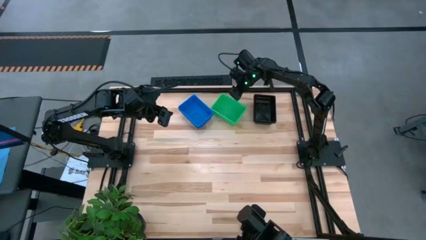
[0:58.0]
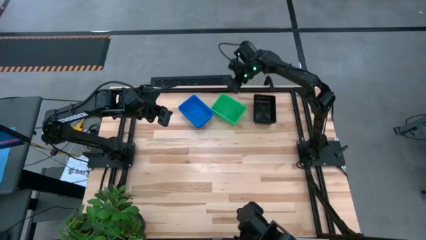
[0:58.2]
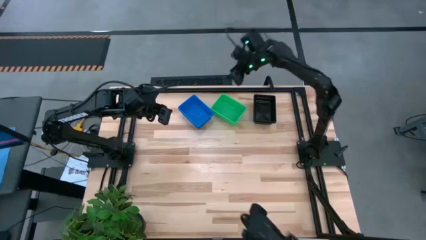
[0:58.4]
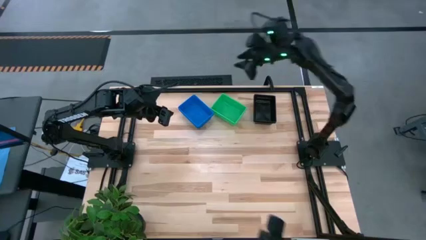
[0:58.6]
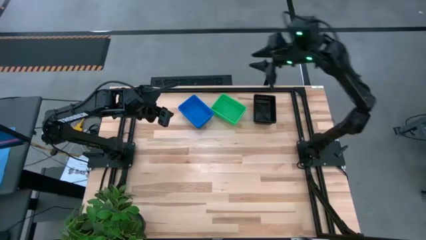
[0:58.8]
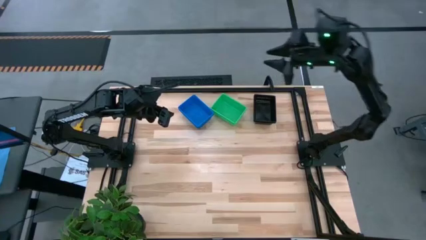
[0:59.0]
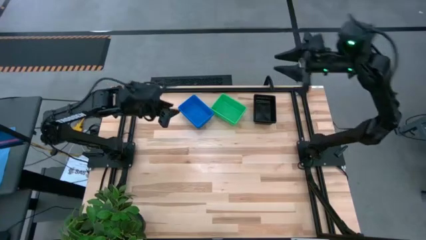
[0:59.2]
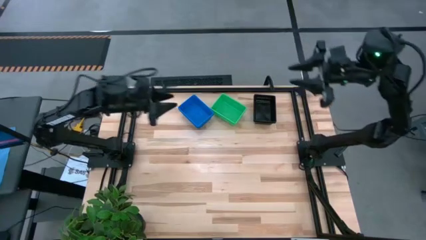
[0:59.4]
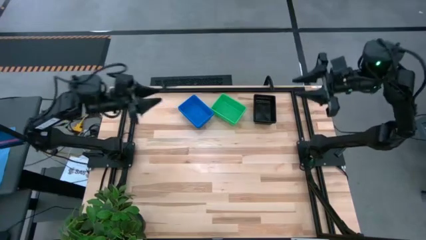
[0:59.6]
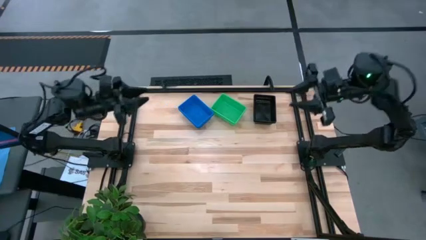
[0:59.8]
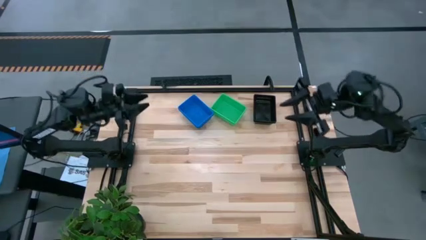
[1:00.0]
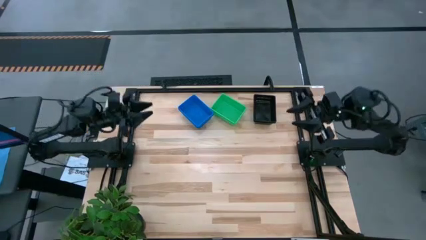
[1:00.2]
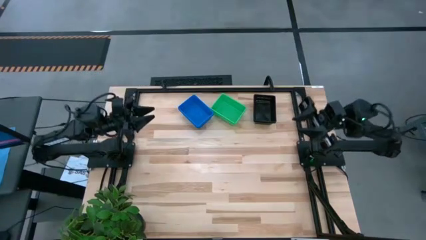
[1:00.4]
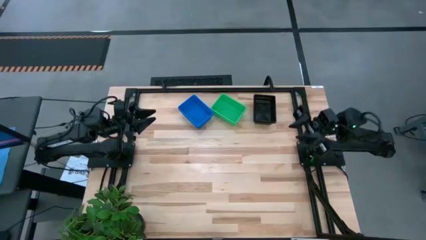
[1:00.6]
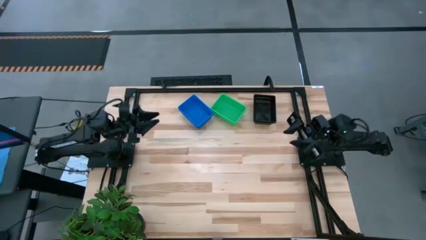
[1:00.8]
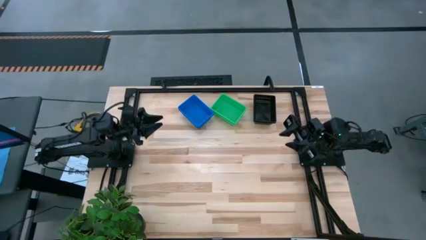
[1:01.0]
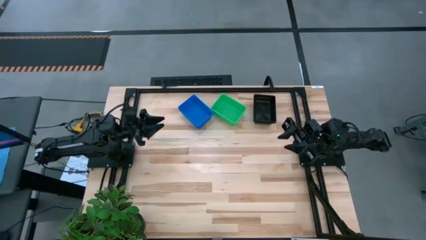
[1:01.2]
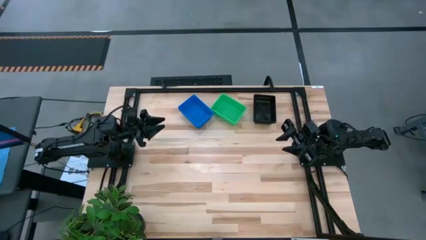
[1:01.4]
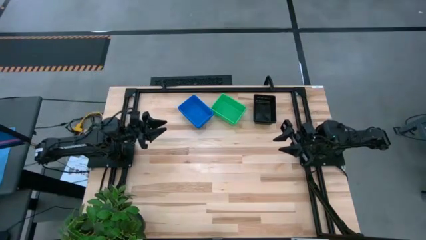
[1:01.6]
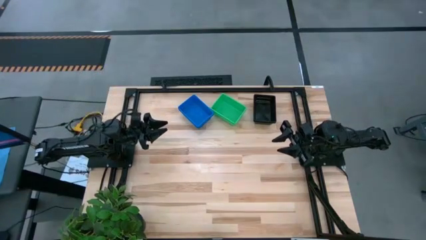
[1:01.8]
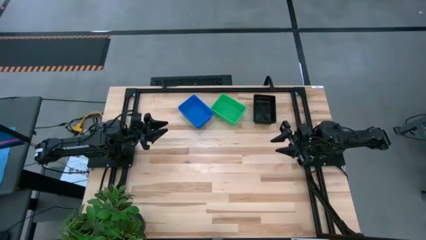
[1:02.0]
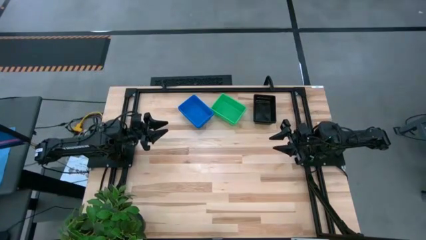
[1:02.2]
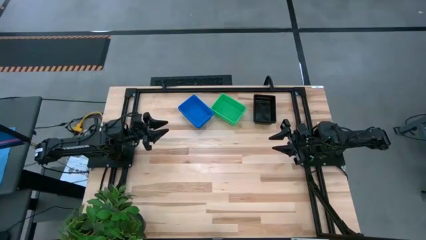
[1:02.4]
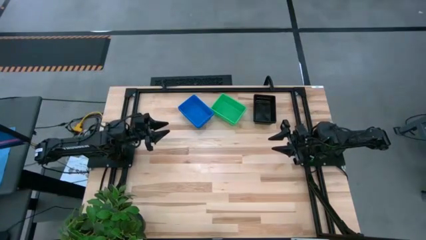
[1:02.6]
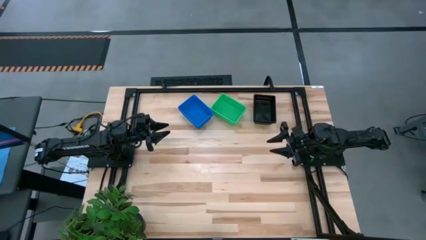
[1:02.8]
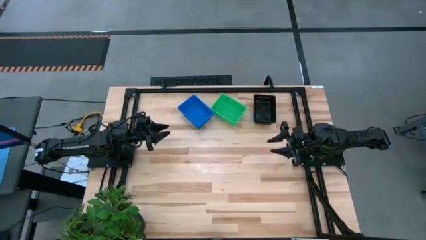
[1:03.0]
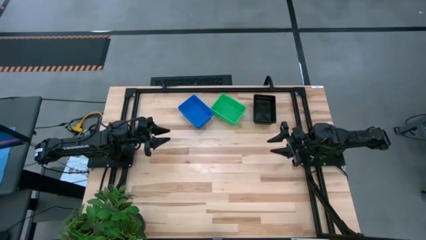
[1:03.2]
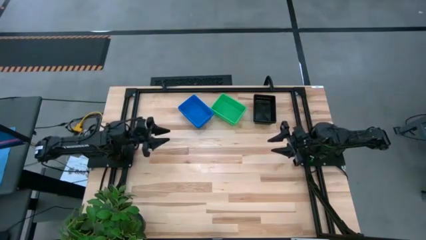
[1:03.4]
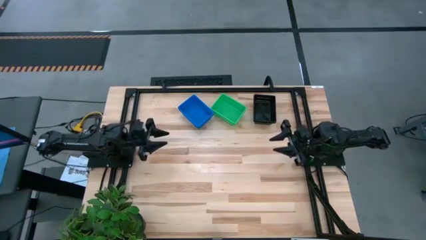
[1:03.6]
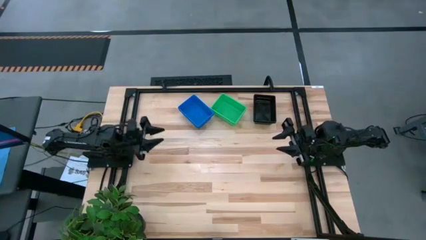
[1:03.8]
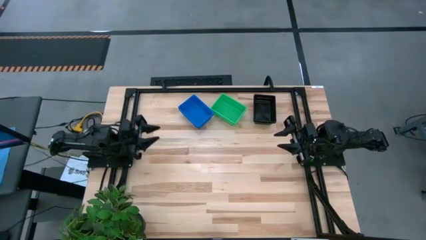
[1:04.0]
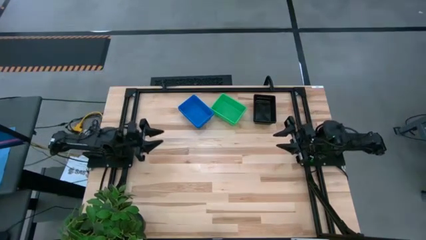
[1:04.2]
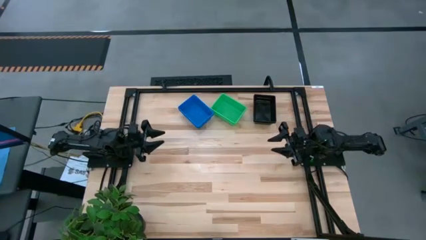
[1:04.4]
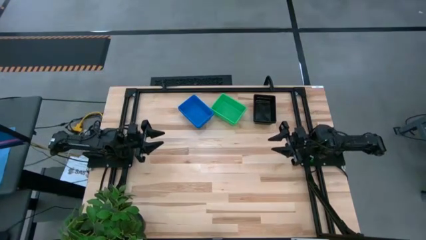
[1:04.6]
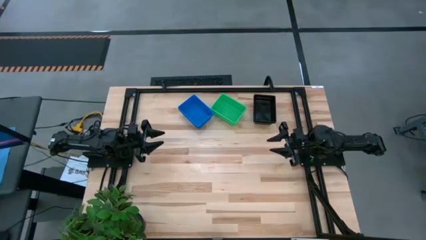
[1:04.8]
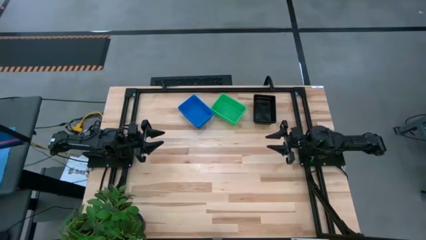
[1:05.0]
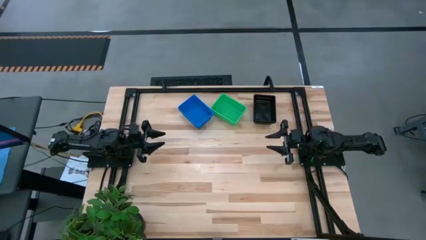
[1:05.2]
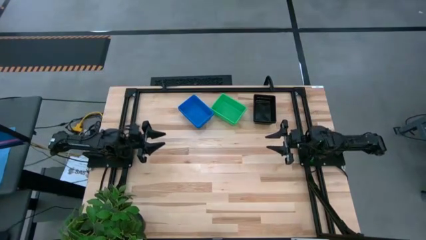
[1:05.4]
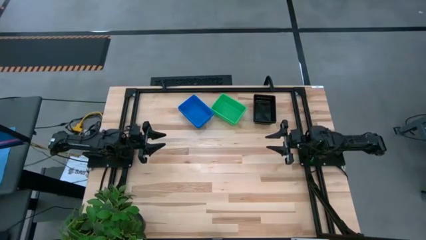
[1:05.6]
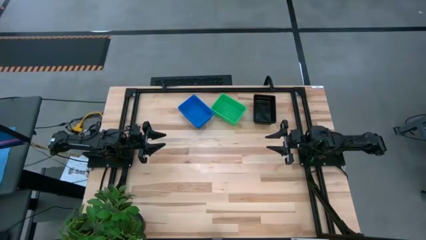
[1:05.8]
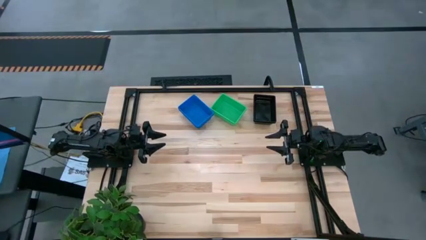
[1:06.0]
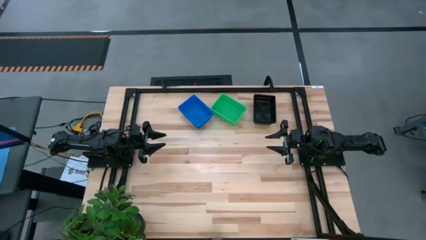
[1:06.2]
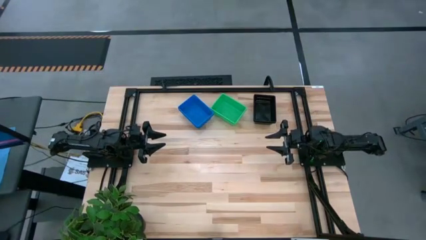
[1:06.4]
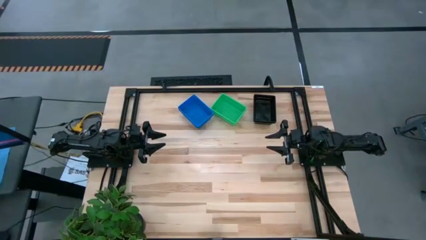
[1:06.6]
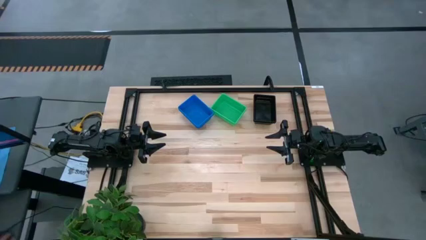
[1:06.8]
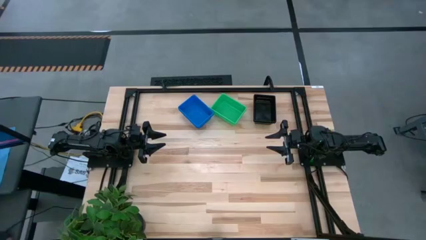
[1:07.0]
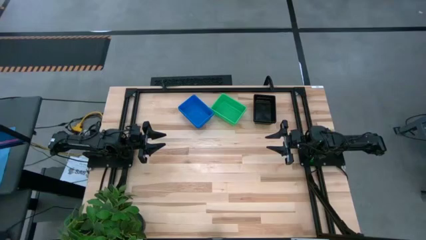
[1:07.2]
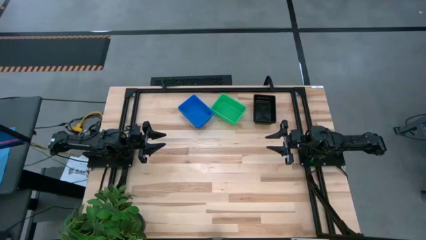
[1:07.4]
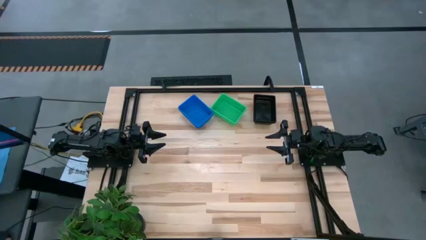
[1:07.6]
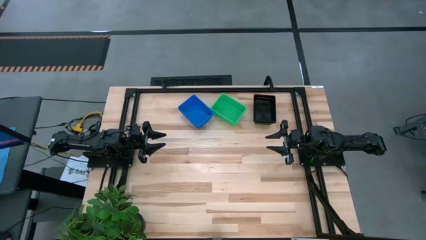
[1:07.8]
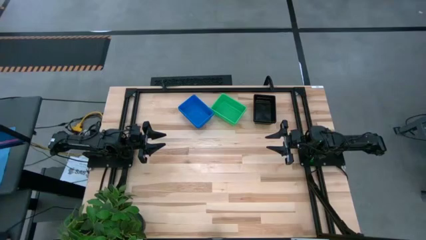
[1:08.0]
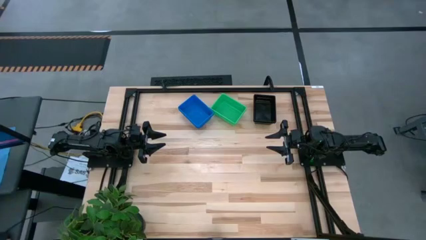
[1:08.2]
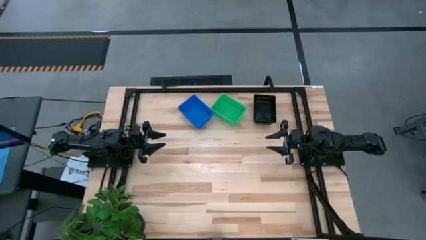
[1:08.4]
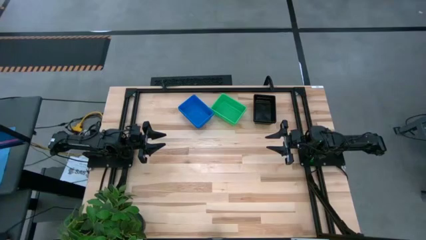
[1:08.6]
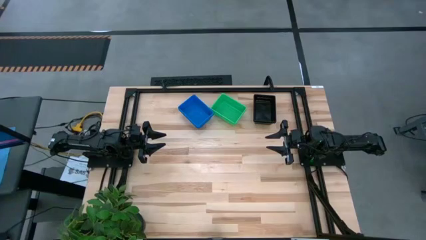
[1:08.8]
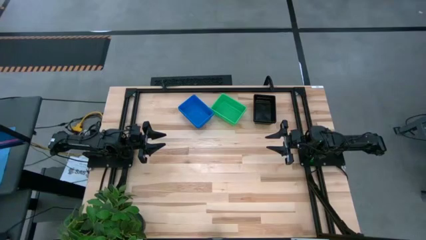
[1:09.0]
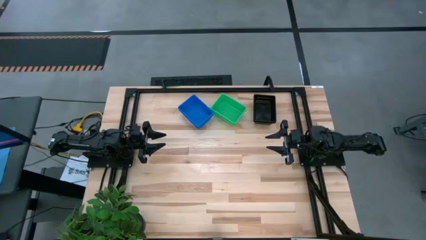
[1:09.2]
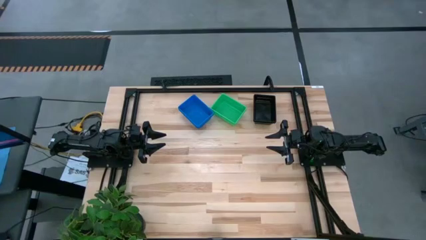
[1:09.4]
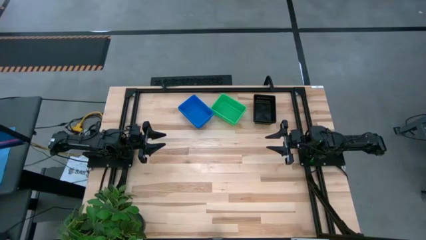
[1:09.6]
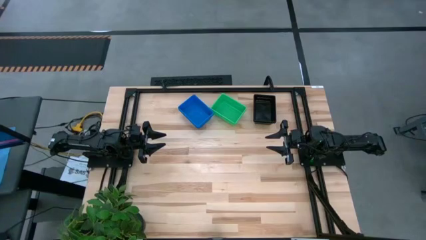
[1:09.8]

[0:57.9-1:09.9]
Return to Home Position
